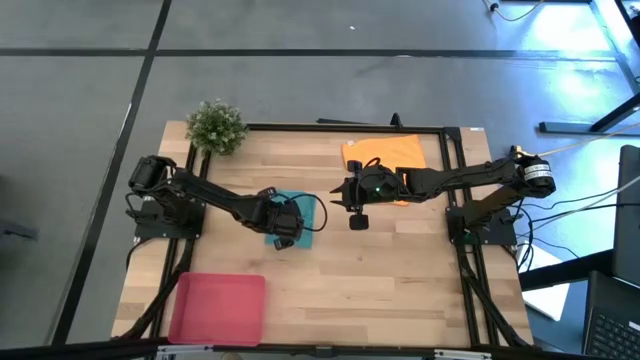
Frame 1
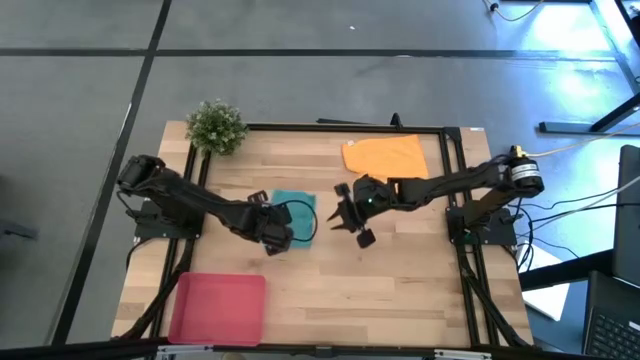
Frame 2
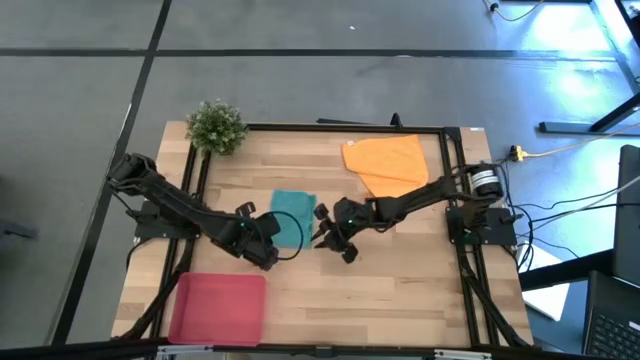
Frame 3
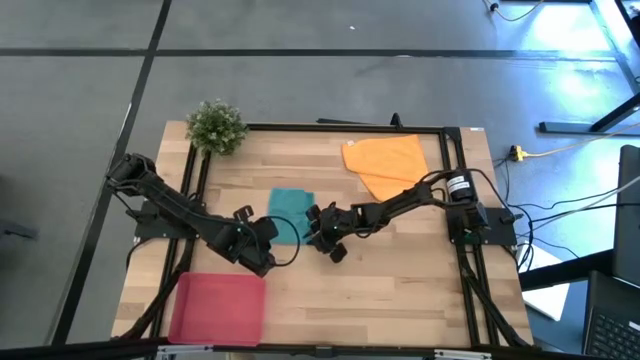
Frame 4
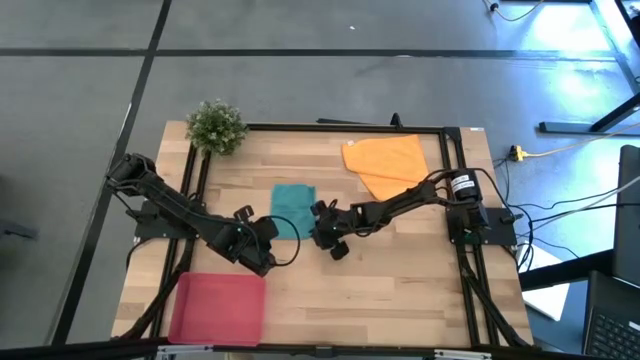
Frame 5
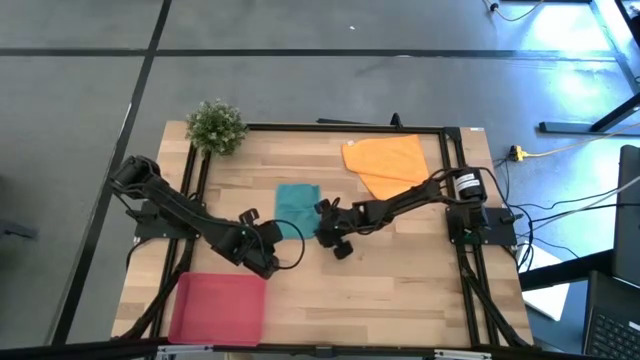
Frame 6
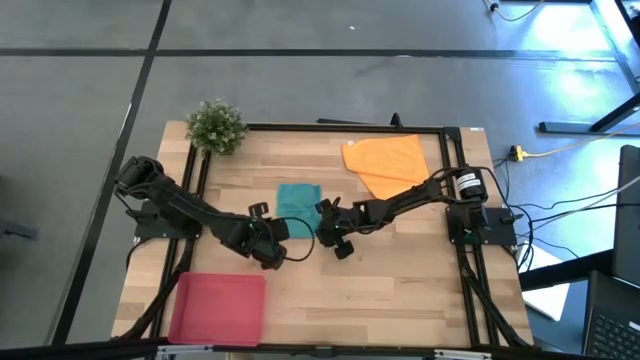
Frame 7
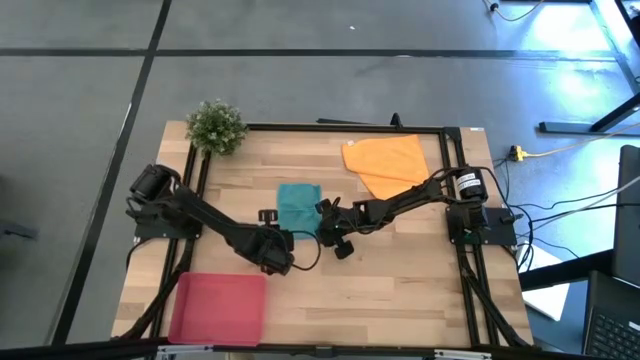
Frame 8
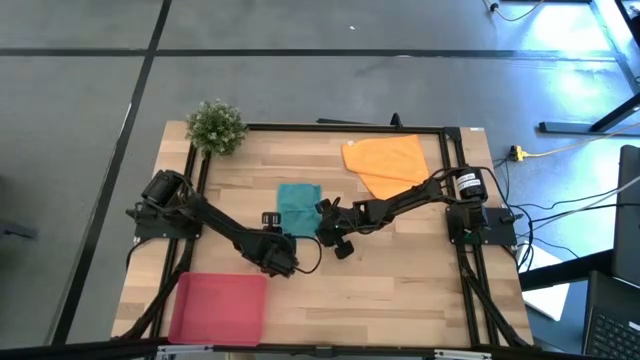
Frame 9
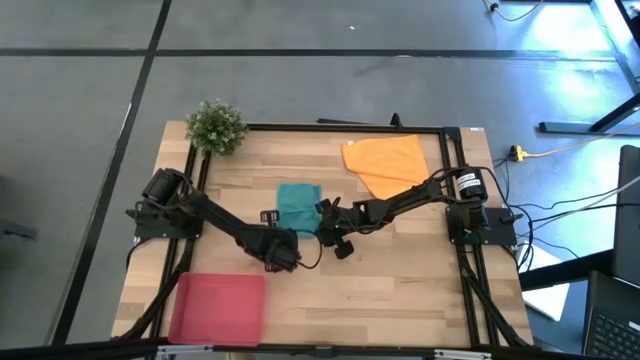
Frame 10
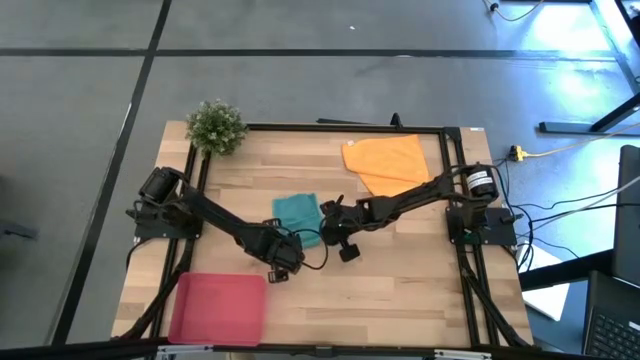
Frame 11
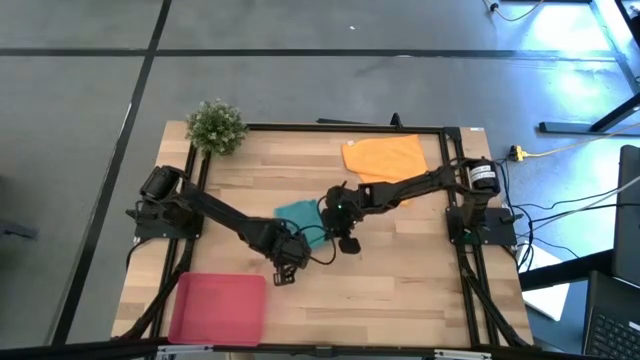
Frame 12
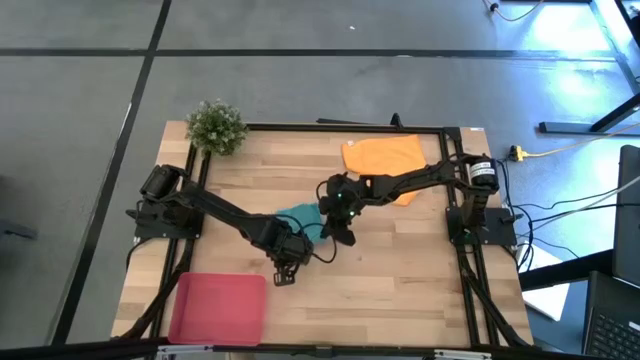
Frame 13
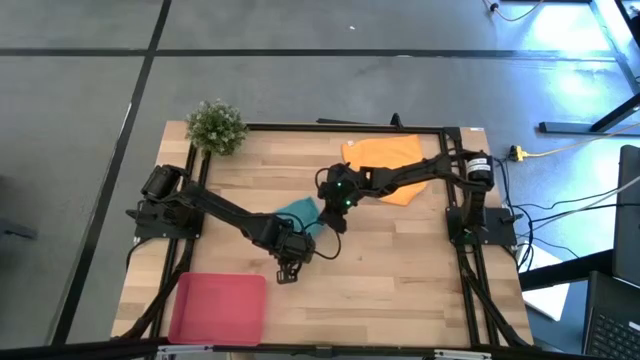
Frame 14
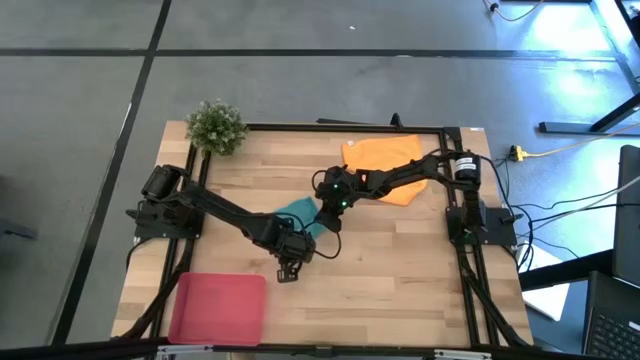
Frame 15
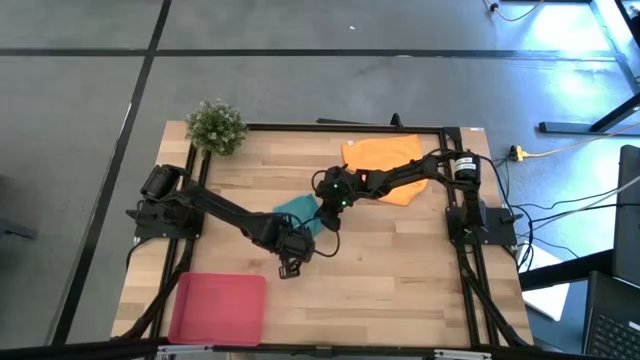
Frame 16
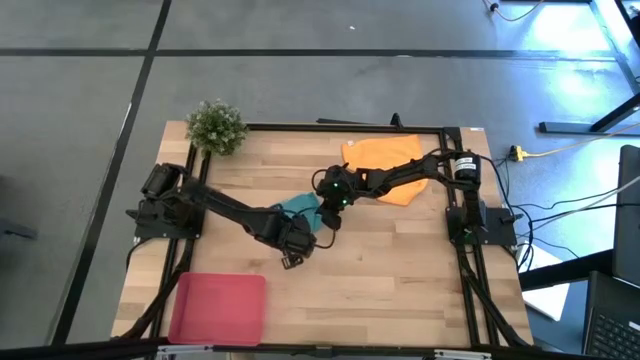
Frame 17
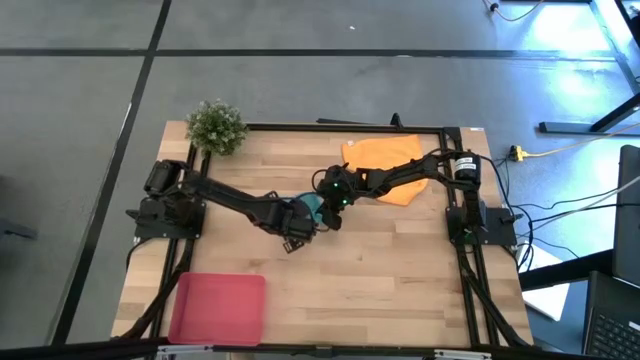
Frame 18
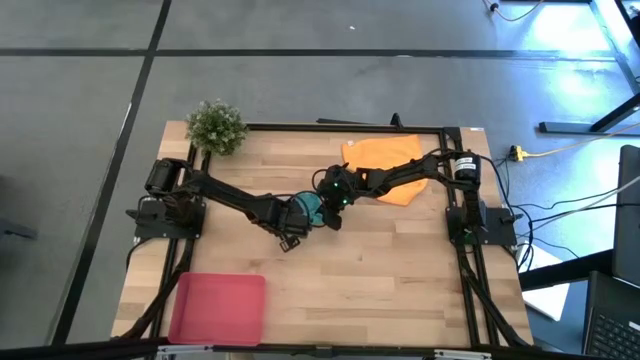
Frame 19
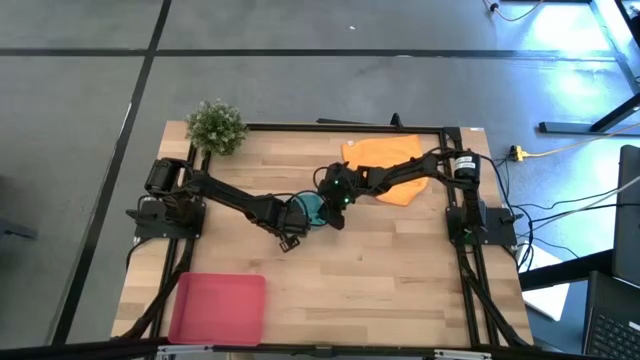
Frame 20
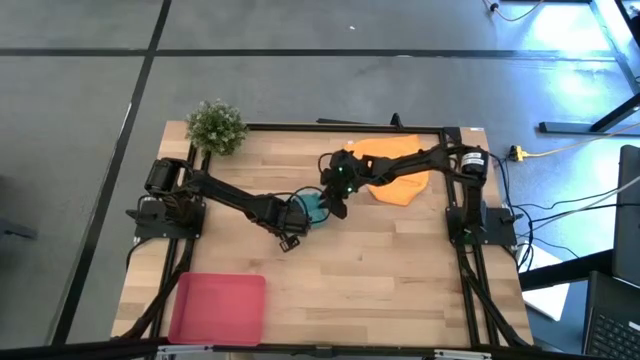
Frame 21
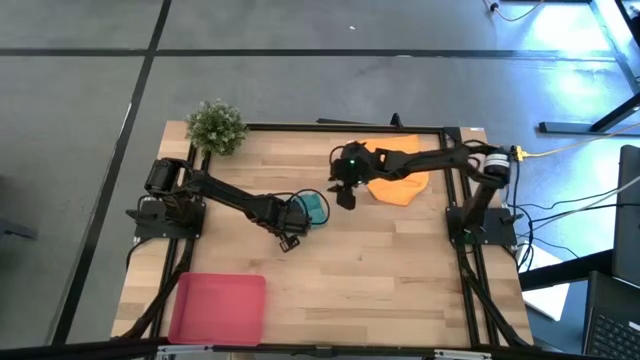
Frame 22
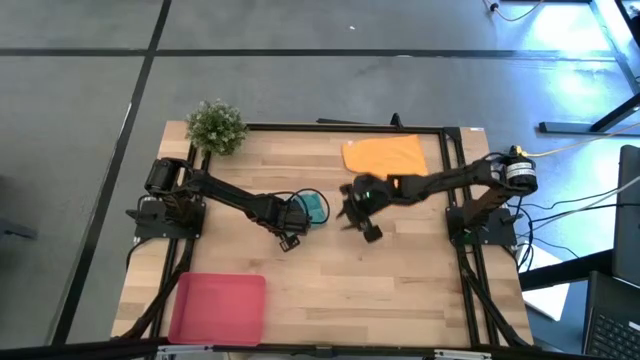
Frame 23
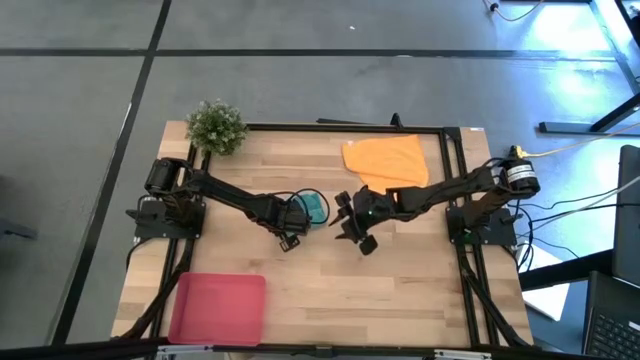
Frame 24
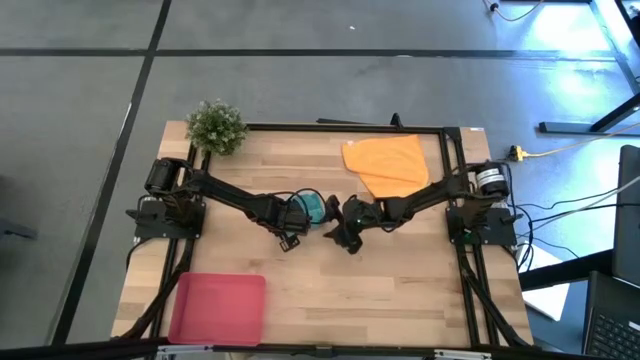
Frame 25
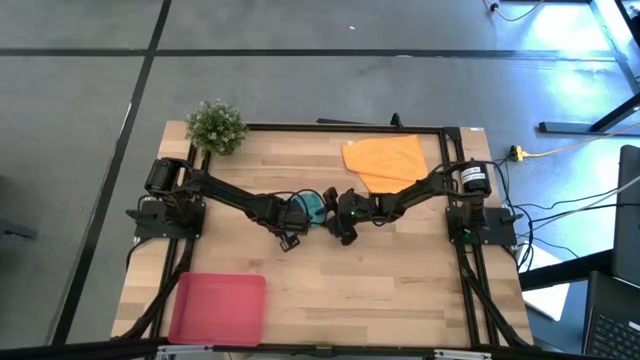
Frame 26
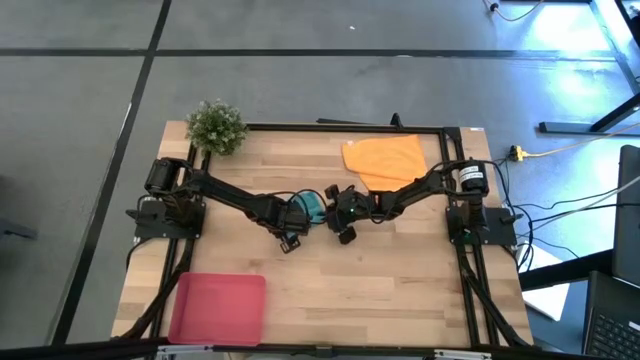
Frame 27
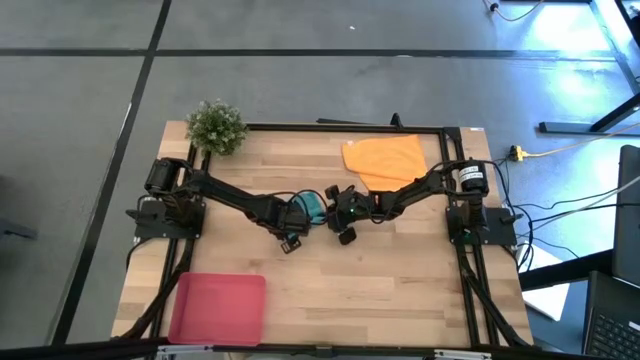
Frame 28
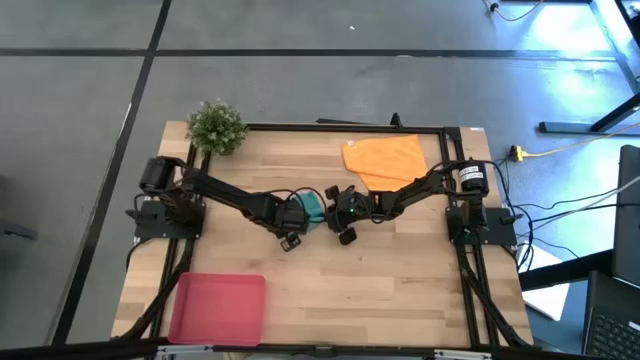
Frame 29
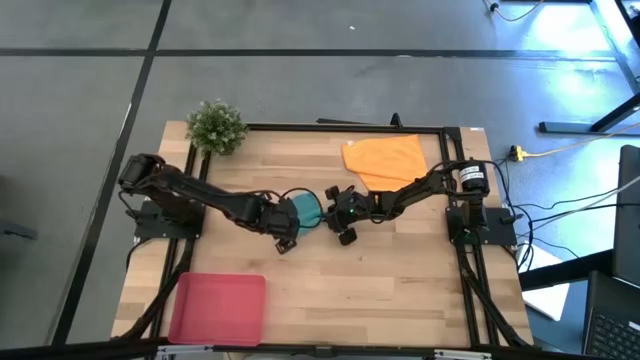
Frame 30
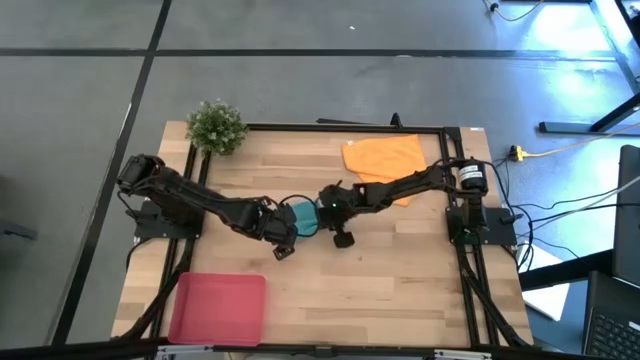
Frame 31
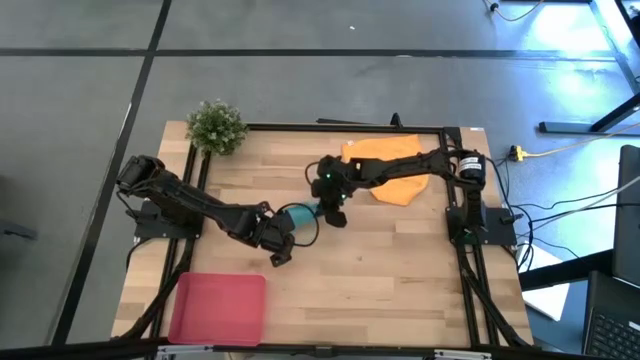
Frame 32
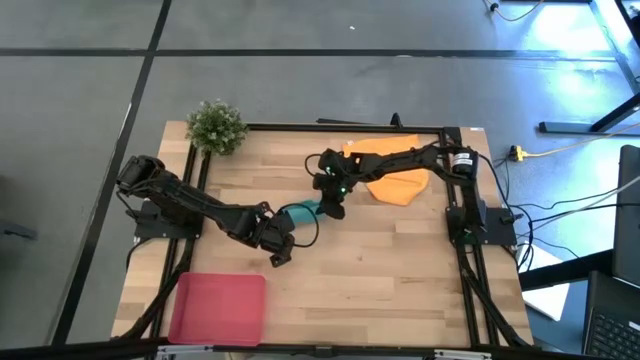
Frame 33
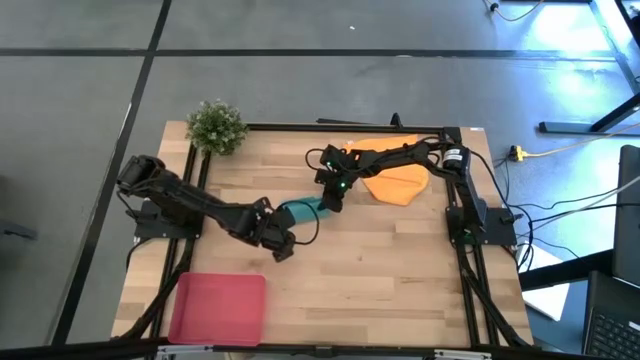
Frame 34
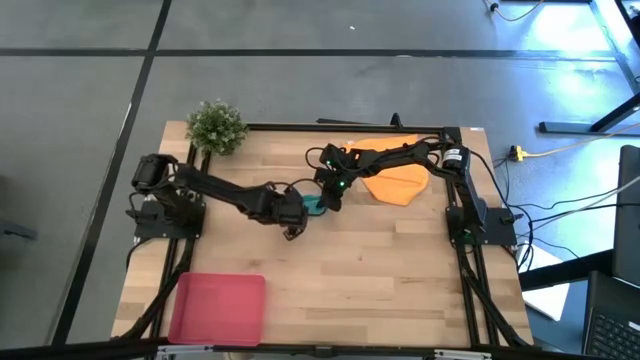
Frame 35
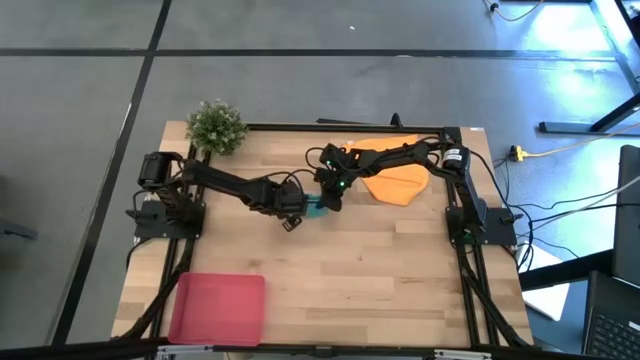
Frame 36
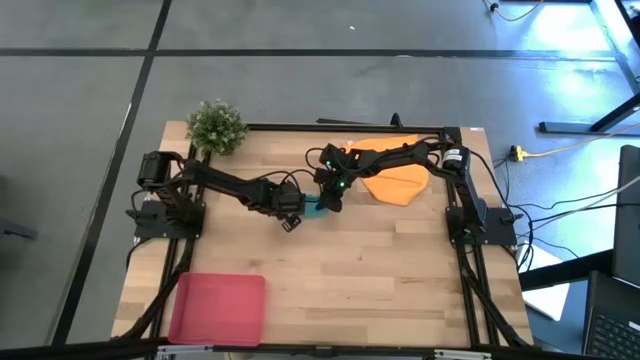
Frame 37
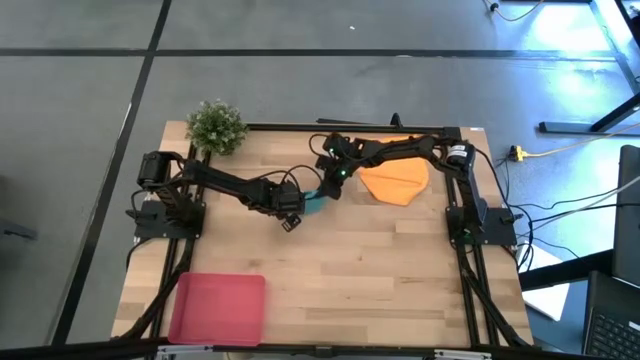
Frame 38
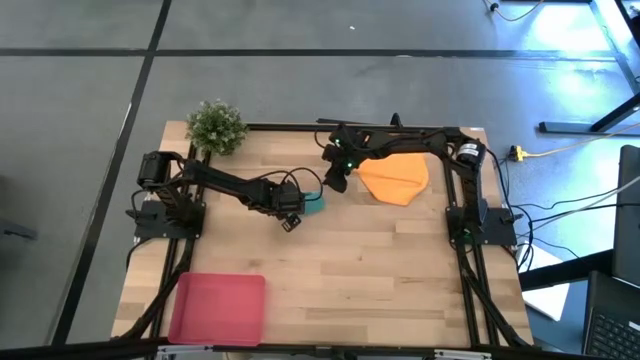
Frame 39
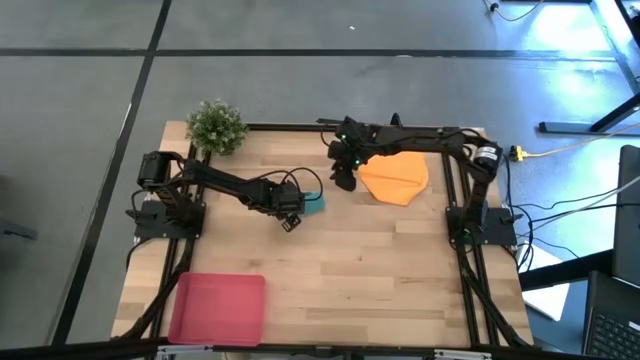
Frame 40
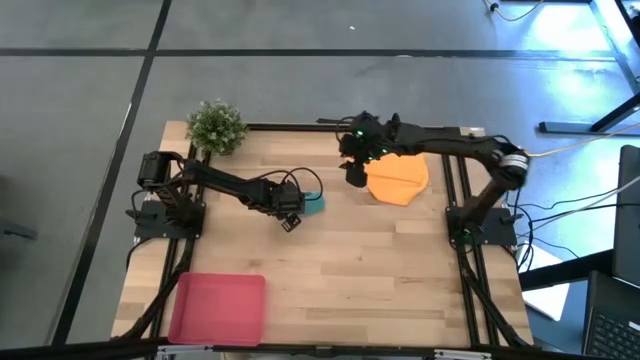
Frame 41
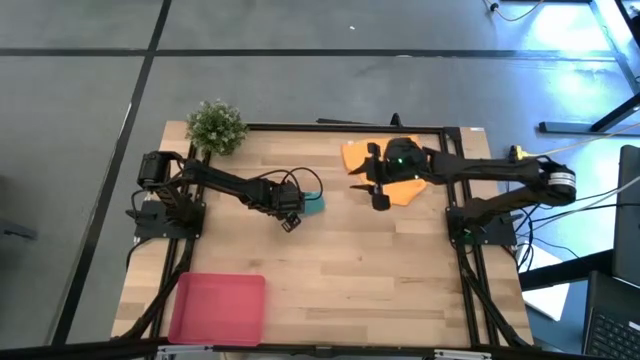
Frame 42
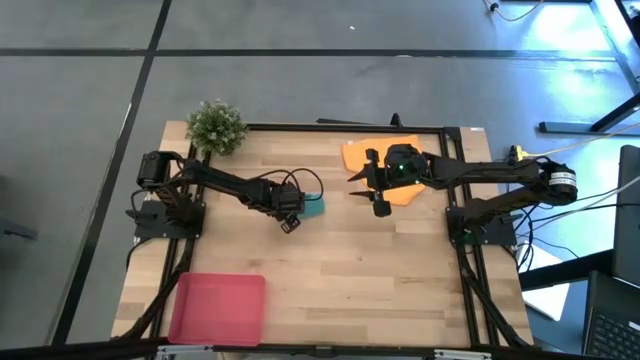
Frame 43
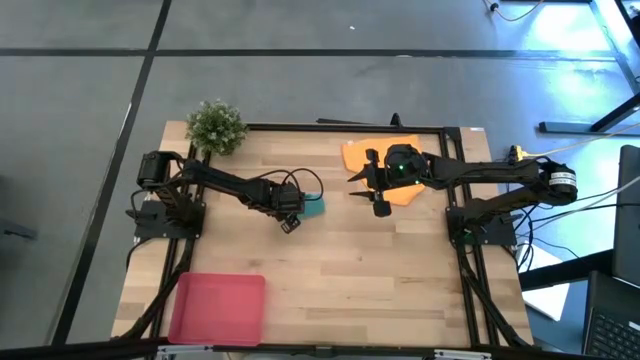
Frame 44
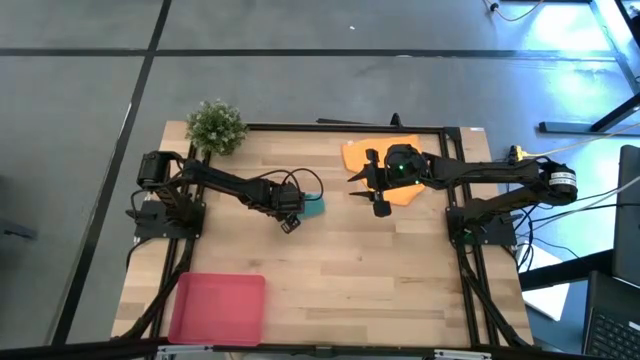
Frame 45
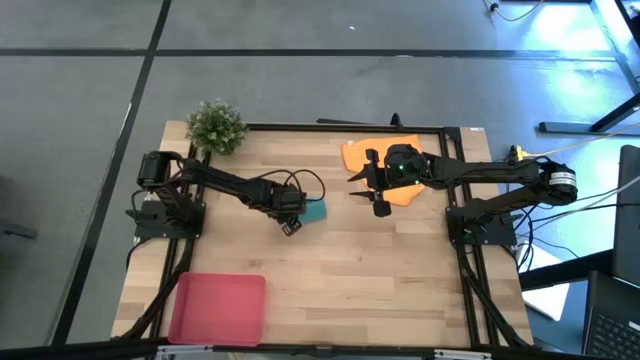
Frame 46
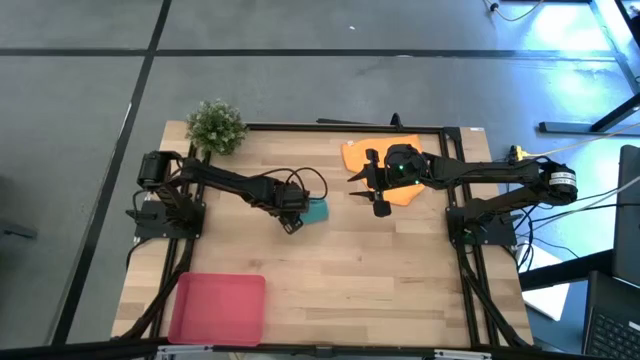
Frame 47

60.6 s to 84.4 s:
Task: Roll microfiber towels into tight, uniform cylinder then place into a basket
Roll the blue microfiber towel
